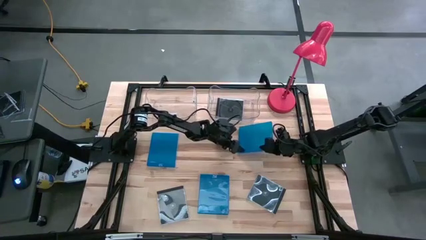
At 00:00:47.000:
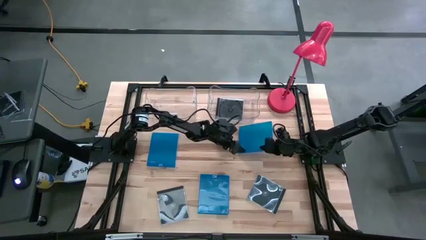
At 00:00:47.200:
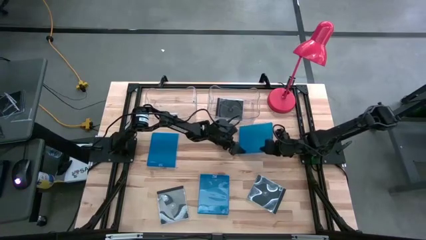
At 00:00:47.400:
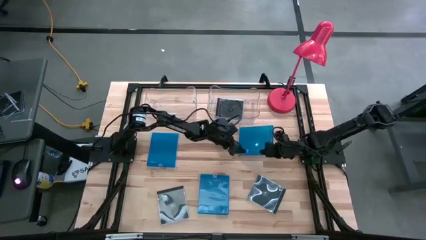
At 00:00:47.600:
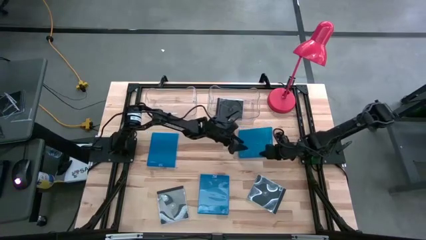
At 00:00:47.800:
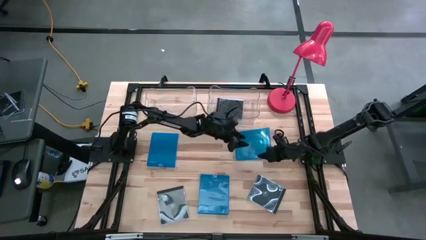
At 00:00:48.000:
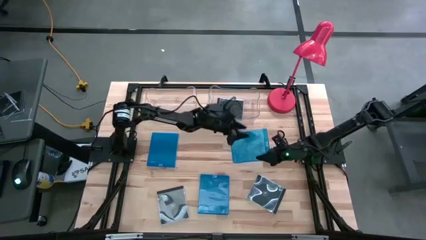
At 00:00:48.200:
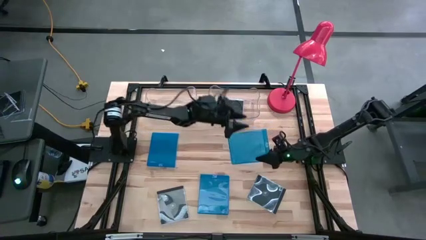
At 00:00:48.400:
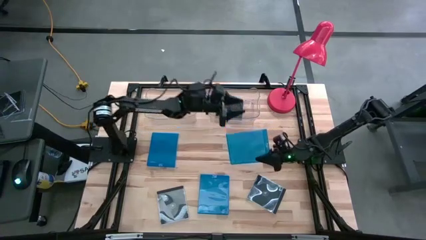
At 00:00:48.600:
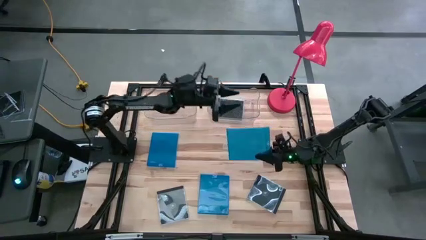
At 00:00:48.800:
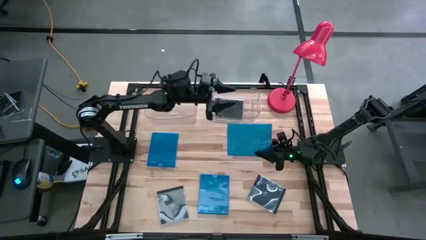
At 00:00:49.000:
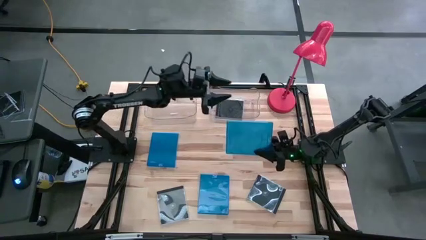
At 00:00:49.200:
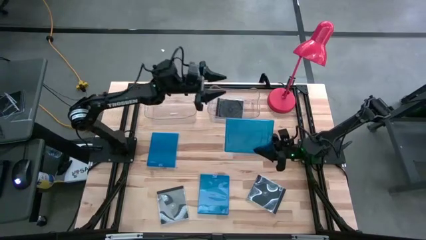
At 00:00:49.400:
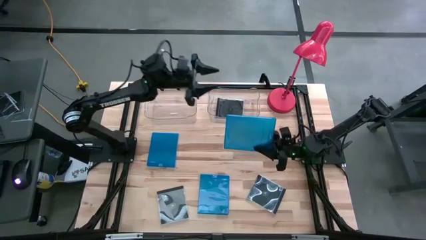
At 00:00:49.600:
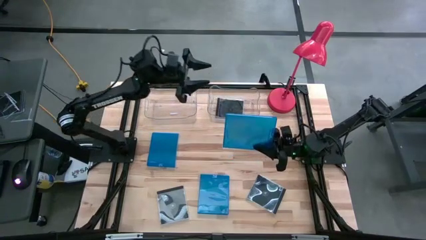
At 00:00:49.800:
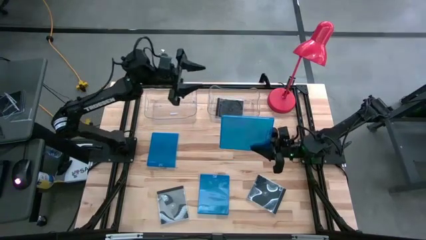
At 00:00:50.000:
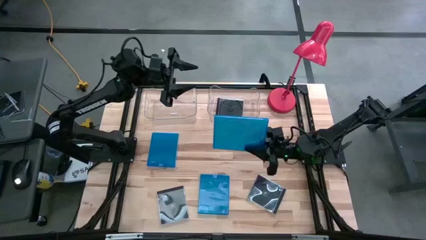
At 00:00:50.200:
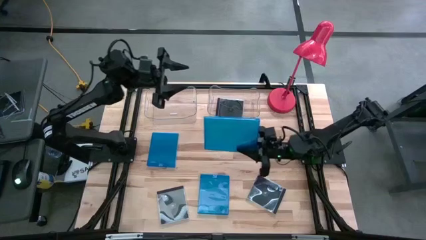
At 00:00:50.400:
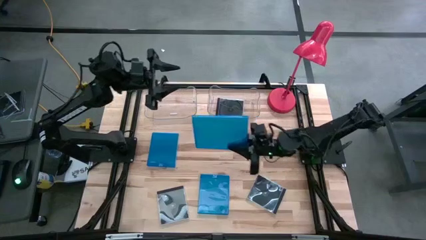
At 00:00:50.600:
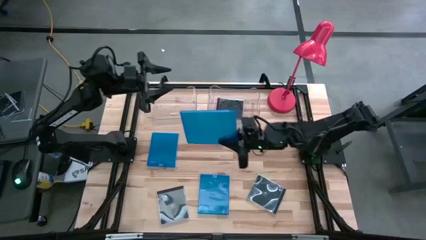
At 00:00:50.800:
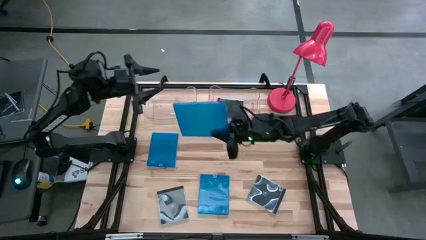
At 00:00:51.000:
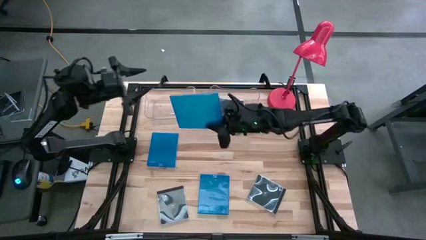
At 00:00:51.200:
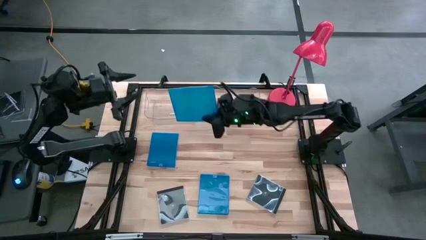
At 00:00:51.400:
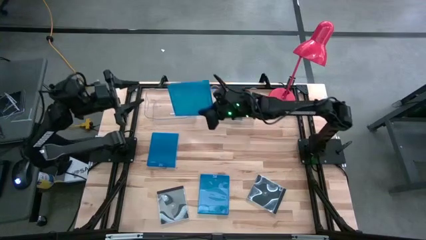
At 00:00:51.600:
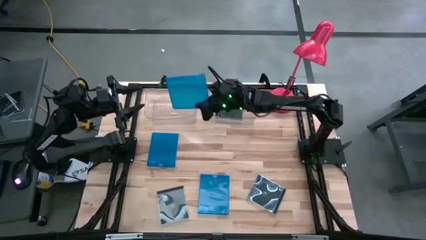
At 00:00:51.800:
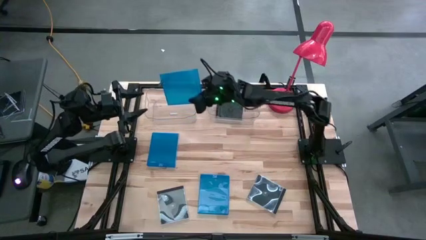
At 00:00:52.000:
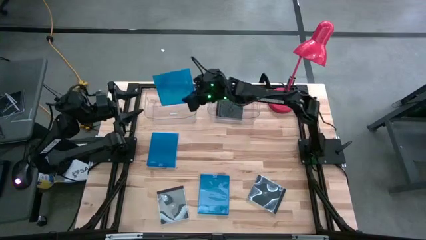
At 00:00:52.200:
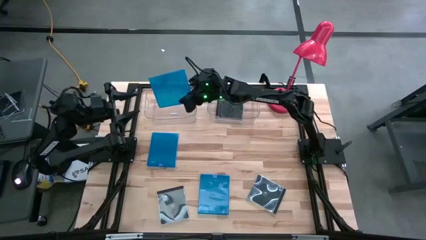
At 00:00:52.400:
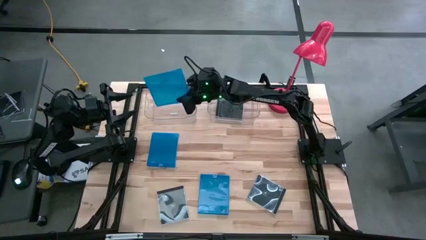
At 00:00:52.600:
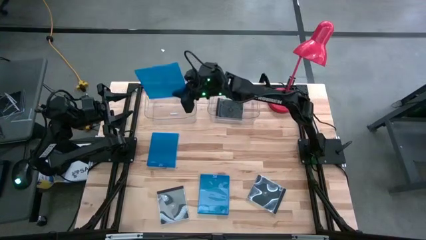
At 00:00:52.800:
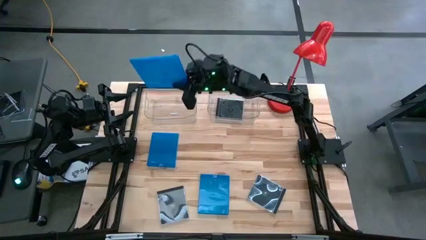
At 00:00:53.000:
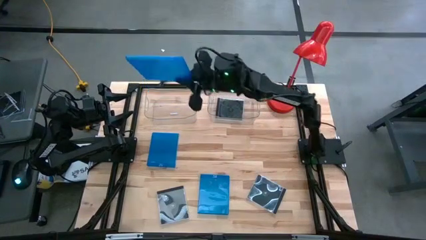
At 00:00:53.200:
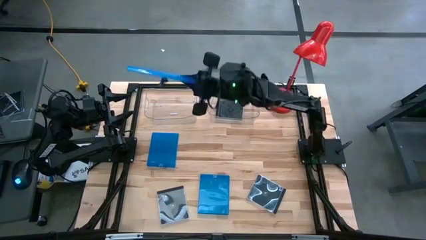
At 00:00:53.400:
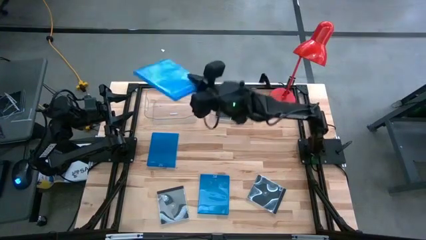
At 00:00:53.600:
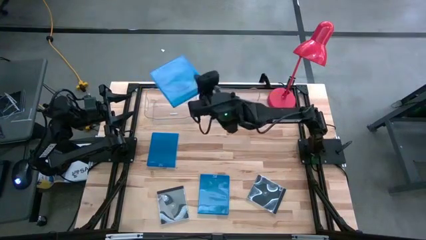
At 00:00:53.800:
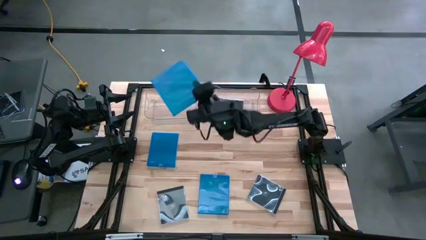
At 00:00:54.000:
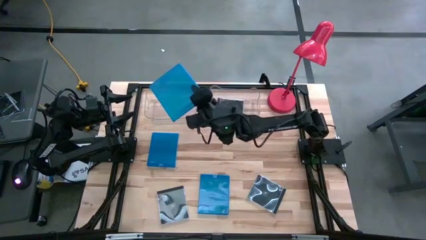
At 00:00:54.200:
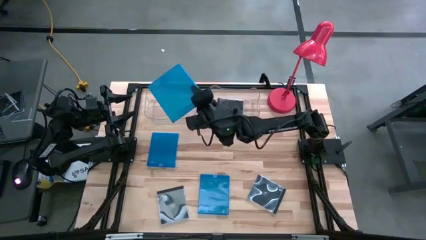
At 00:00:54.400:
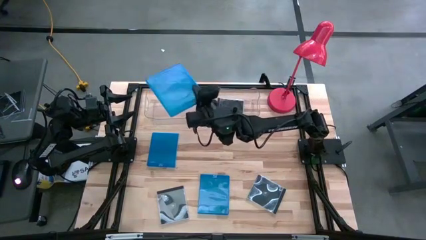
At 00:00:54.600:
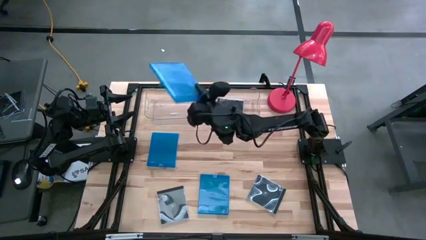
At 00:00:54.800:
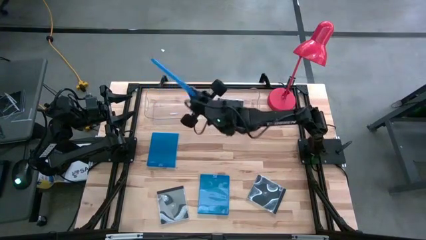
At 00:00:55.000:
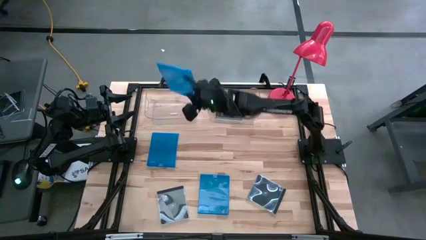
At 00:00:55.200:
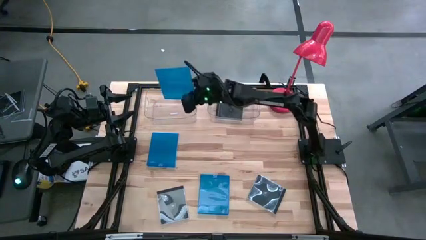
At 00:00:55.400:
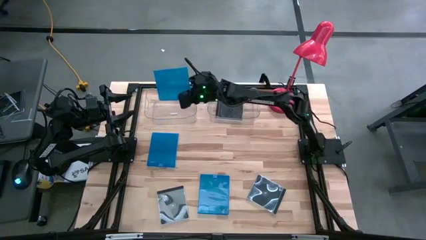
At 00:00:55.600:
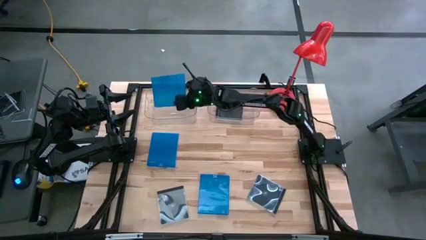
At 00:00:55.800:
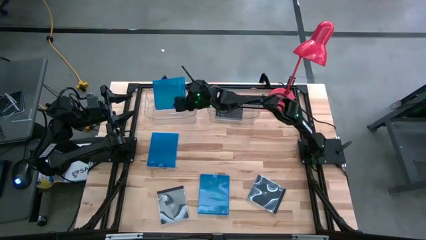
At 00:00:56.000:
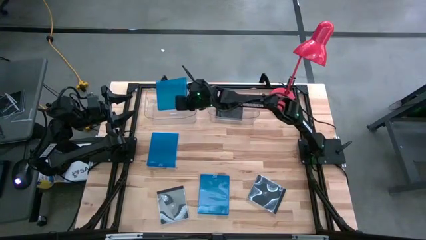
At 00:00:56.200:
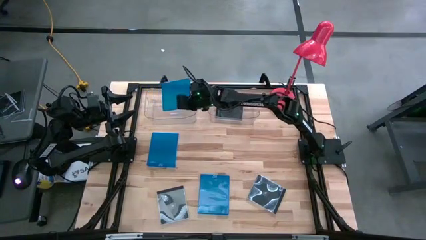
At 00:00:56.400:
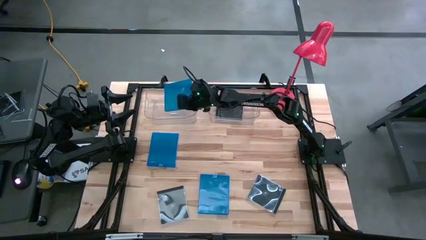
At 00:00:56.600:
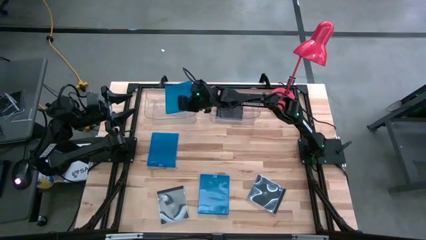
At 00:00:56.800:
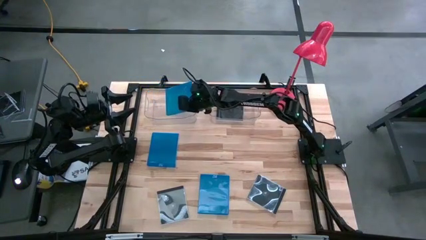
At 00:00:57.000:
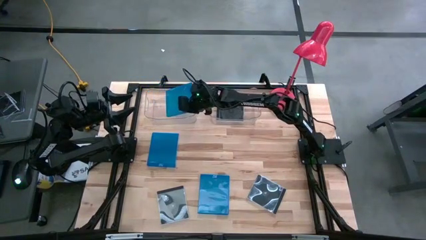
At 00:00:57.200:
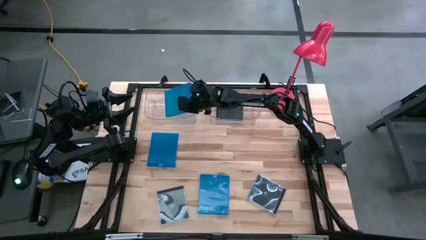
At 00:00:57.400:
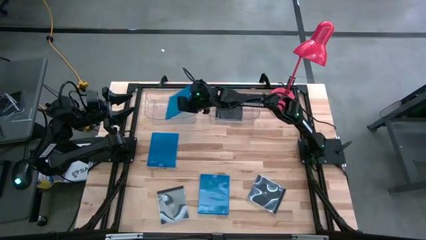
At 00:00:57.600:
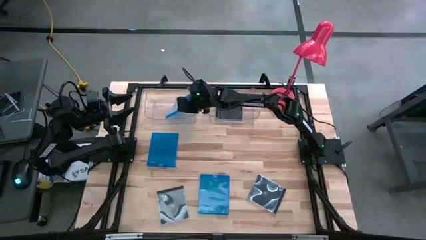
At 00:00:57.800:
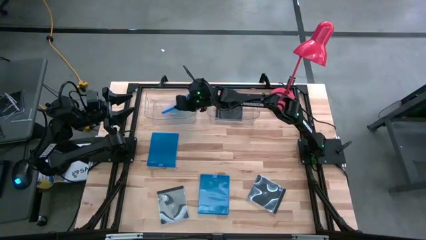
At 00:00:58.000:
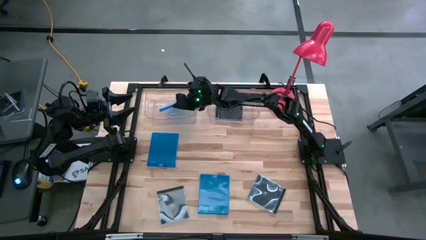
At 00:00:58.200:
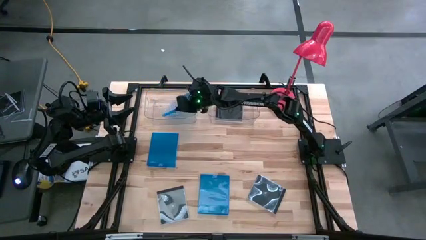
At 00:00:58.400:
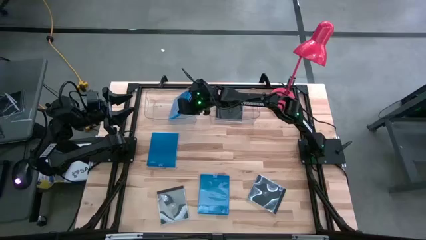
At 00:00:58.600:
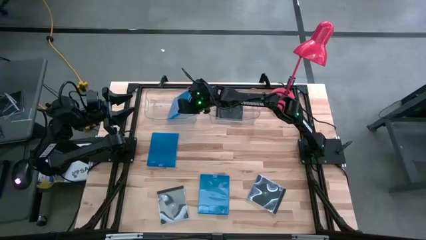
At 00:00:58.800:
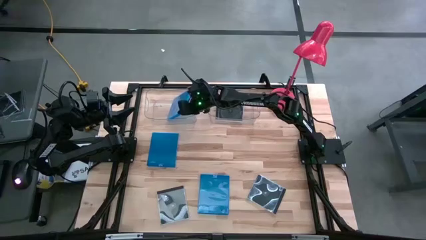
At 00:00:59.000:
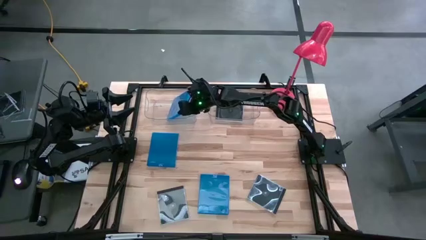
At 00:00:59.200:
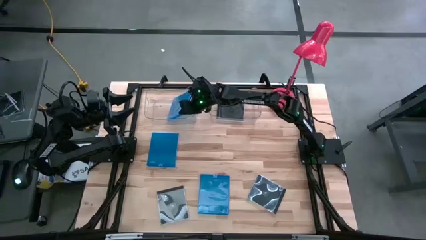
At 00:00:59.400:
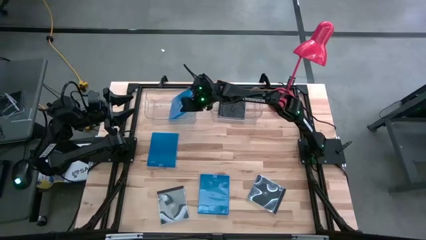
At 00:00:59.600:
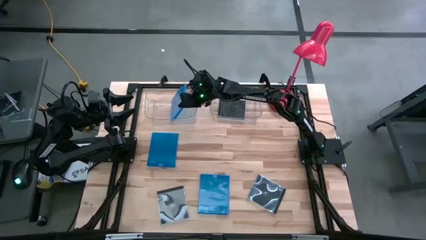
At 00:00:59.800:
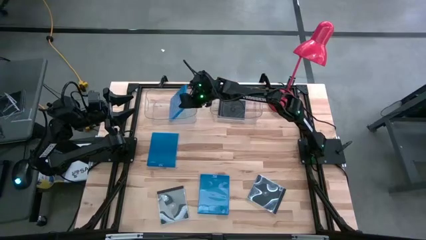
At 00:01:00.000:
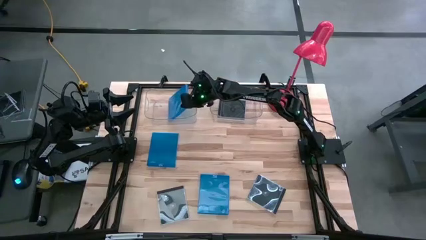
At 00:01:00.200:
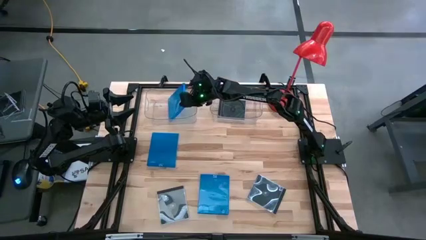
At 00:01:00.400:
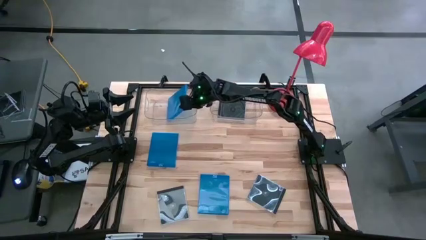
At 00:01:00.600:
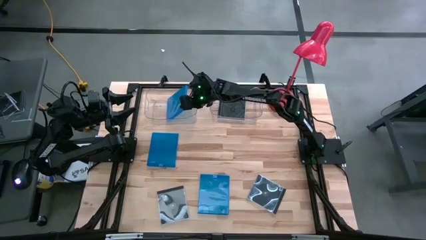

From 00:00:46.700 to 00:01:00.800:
Task: Pick & place jewel cases by type
Put the top right blue CD case into the left transparent bin

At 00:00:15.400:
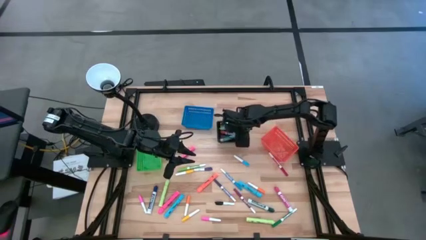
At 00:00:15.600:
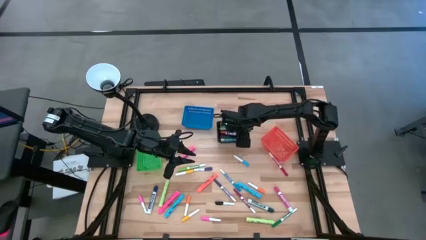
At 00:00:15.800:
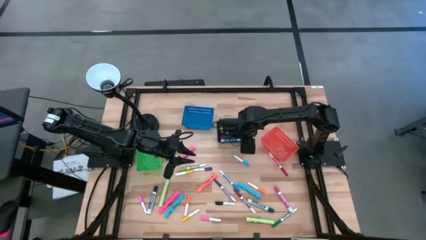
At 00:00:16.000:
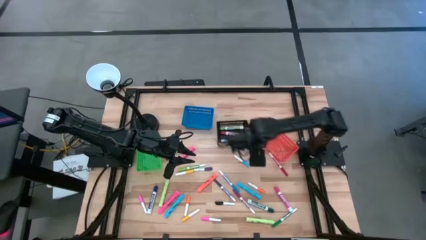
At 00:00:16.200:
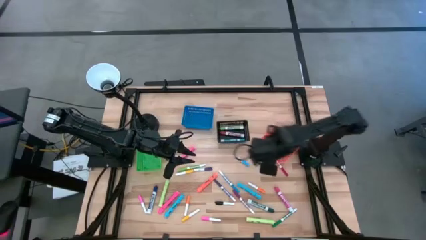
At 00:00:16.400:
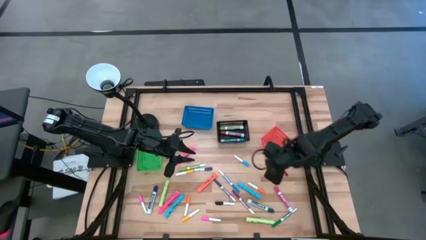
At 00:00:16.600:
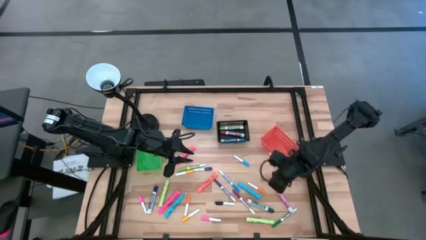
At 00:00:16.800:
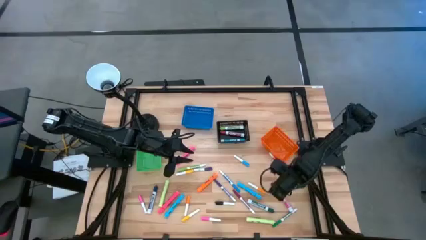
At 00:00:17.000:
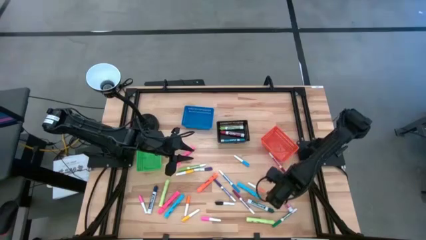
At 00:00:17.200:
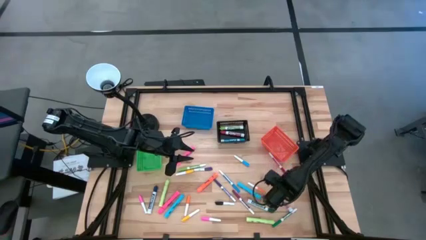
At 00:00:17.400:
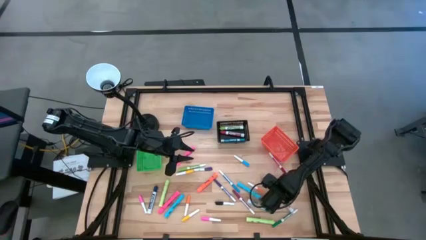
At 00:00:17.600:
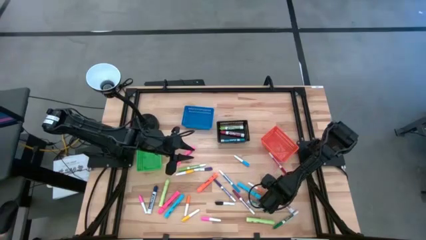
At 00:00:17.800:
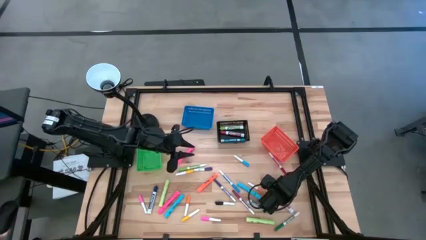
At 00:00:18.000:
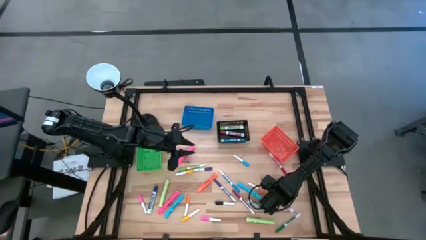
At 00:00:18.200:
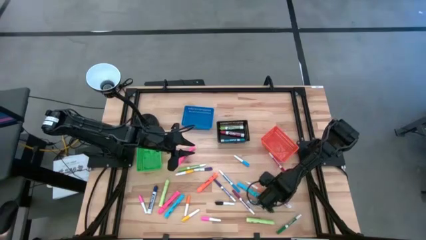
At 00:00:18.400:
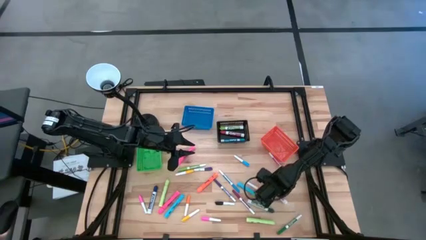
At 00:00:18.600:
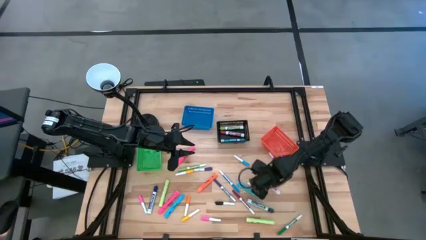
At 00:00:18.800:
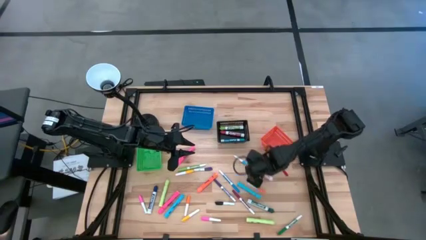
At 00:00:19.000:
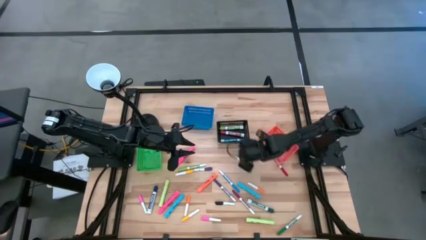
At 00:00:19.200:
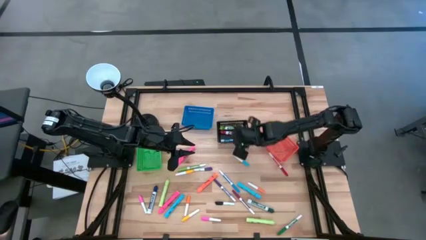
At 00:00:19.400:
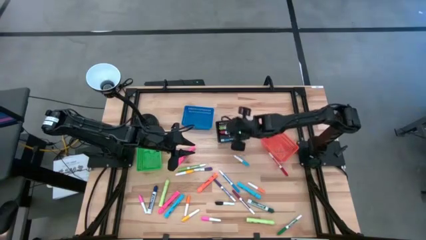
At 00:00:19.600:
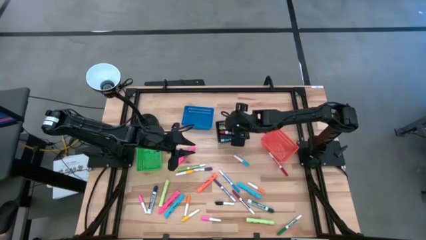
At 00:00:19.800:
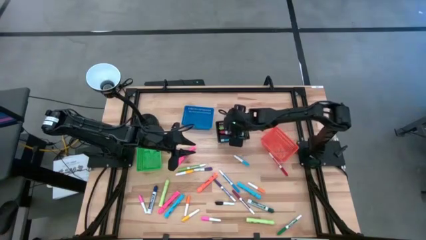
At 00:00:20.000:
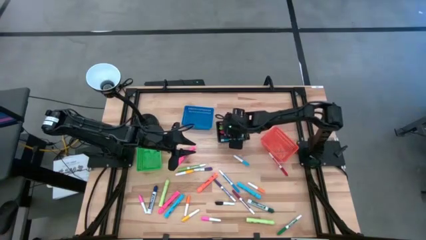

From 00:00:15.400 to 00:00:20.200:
Task: Pick & Place Markers
Put the pink marker pen into the black basket
